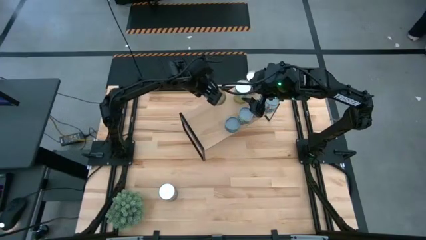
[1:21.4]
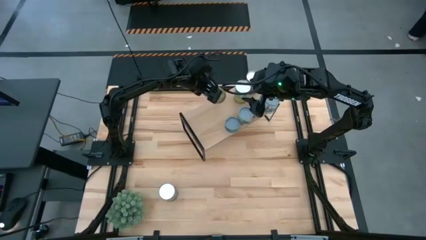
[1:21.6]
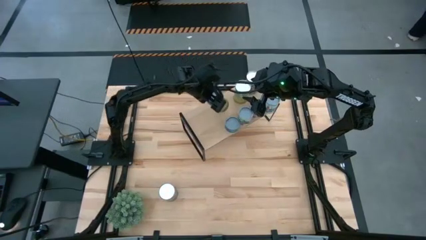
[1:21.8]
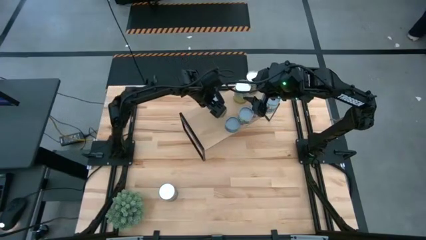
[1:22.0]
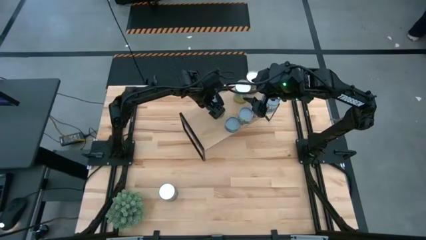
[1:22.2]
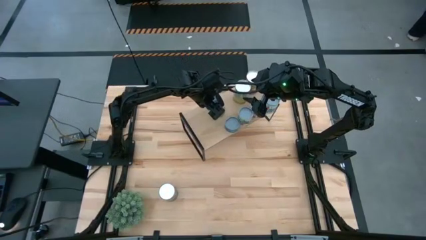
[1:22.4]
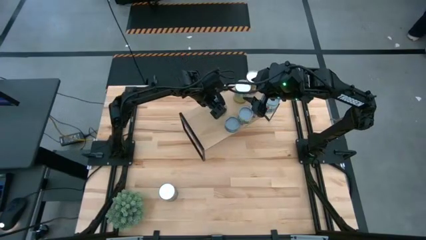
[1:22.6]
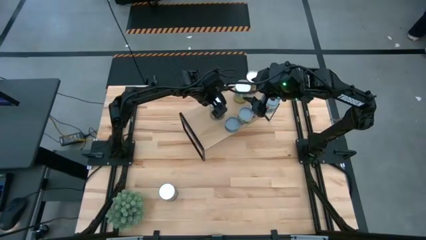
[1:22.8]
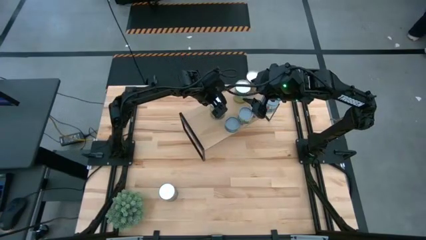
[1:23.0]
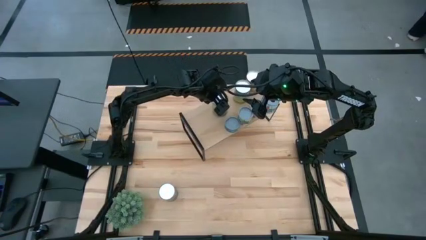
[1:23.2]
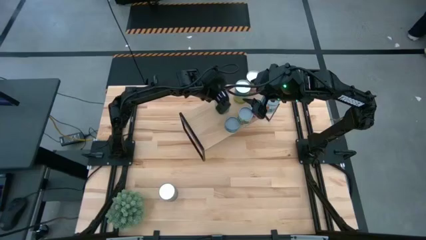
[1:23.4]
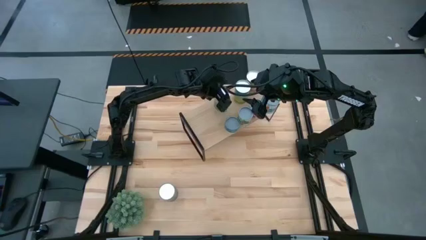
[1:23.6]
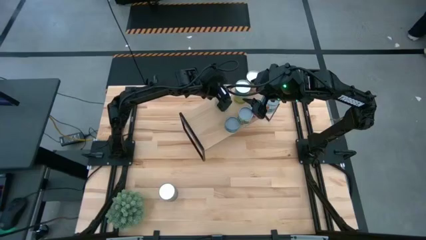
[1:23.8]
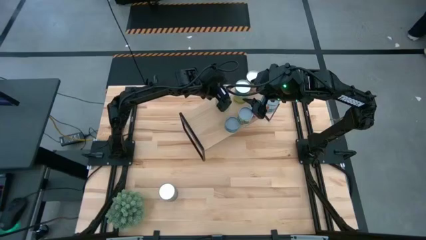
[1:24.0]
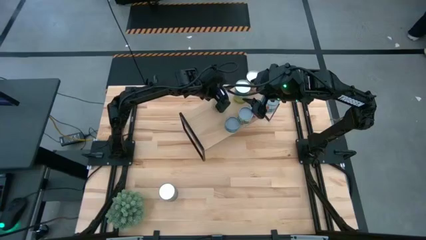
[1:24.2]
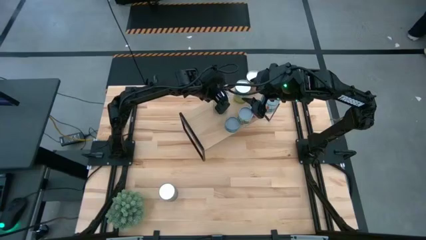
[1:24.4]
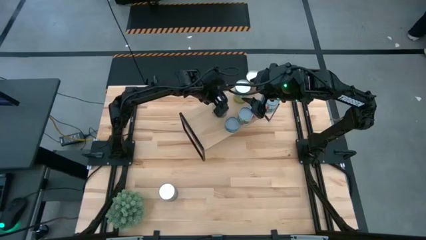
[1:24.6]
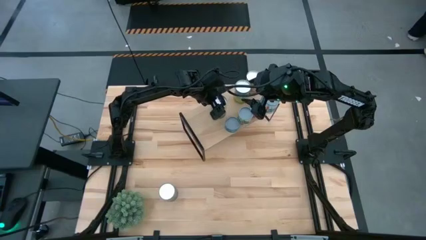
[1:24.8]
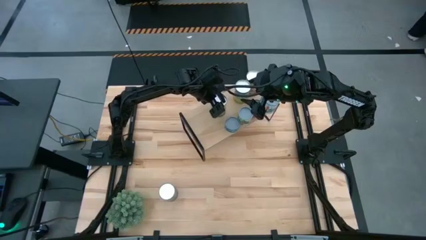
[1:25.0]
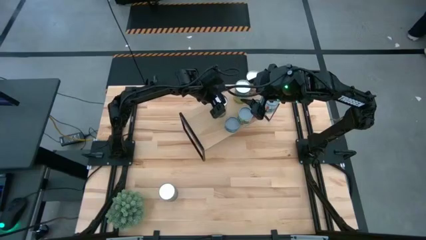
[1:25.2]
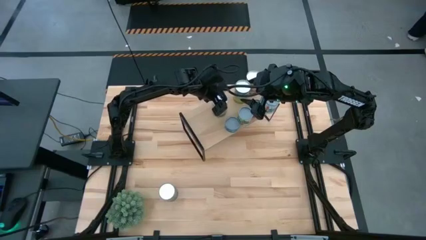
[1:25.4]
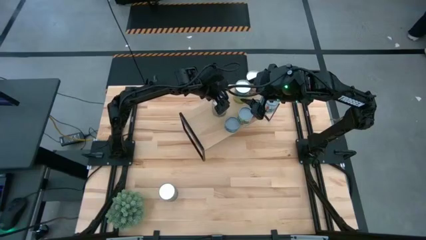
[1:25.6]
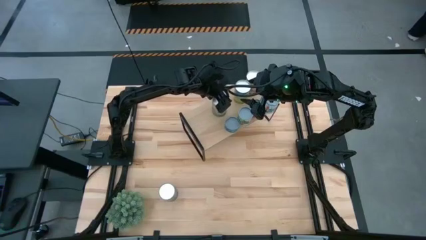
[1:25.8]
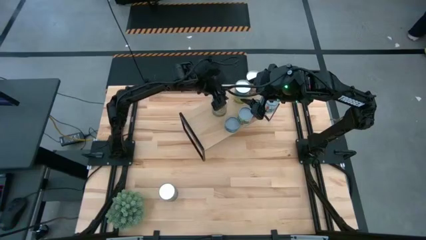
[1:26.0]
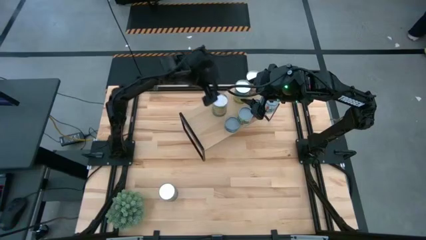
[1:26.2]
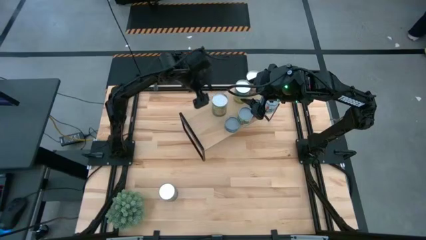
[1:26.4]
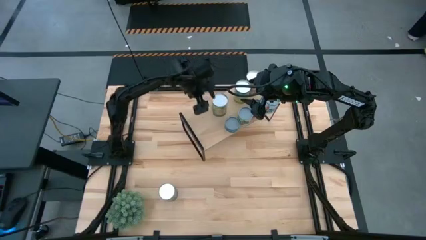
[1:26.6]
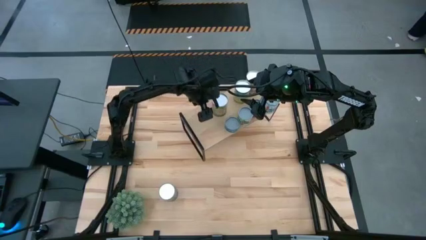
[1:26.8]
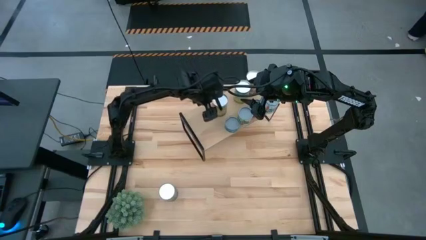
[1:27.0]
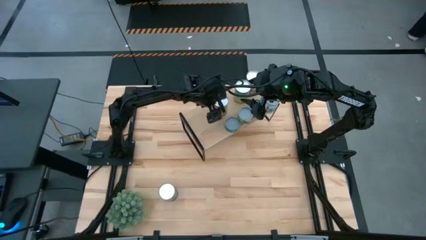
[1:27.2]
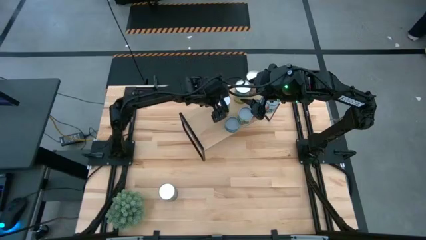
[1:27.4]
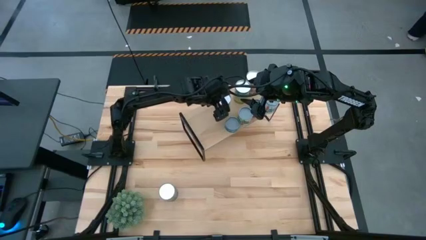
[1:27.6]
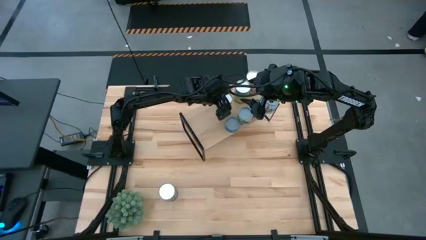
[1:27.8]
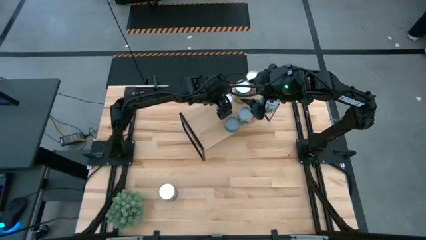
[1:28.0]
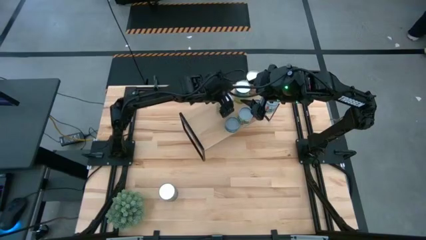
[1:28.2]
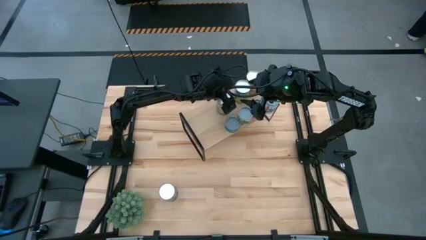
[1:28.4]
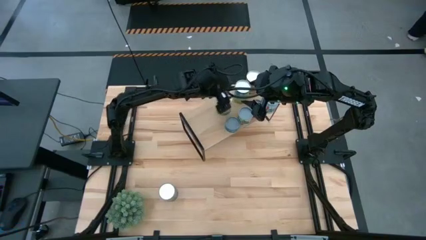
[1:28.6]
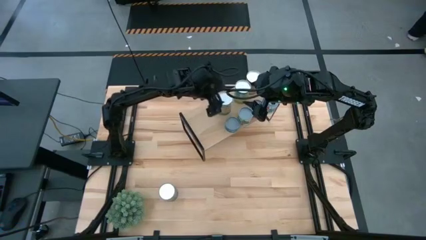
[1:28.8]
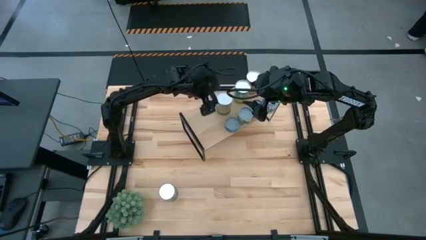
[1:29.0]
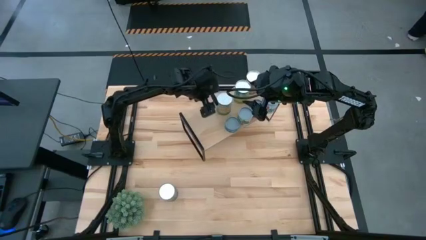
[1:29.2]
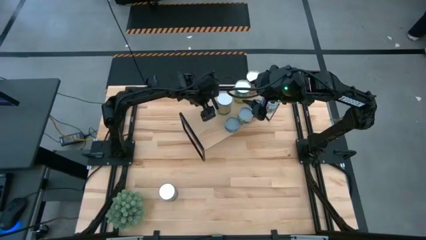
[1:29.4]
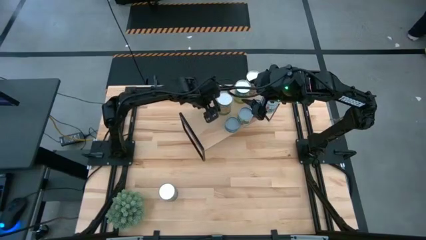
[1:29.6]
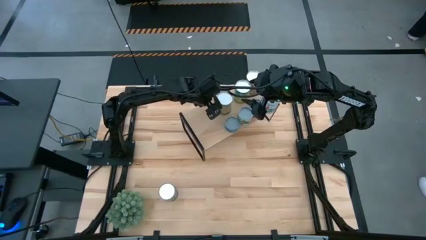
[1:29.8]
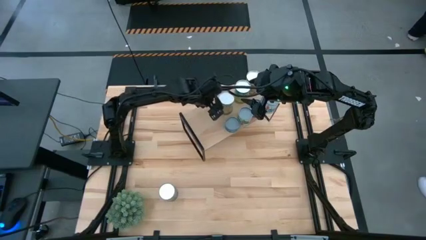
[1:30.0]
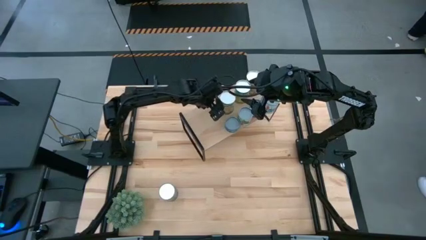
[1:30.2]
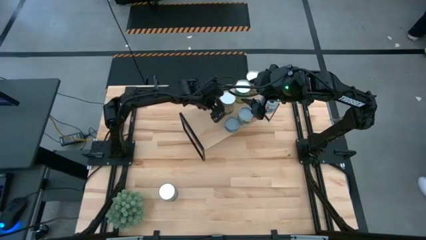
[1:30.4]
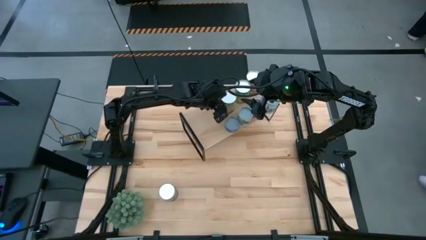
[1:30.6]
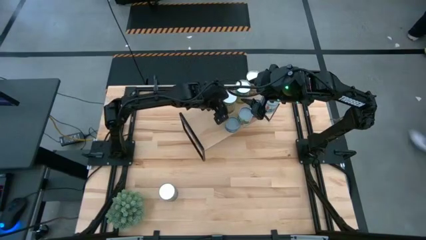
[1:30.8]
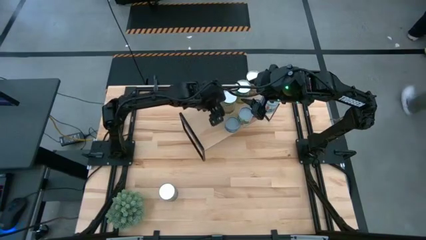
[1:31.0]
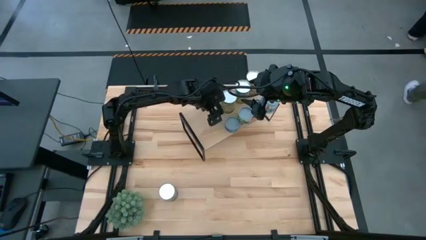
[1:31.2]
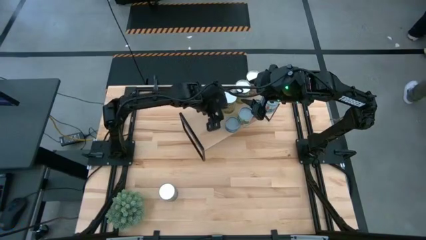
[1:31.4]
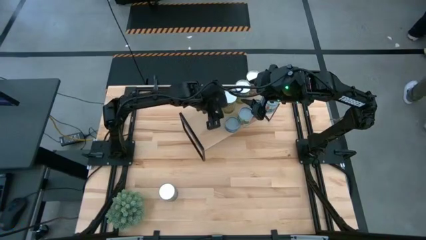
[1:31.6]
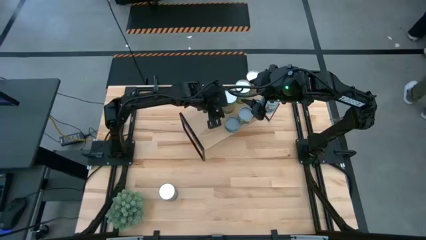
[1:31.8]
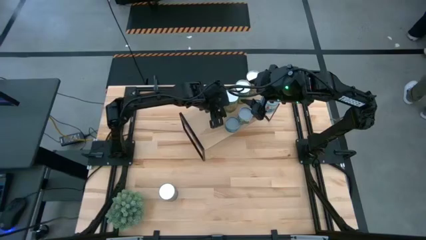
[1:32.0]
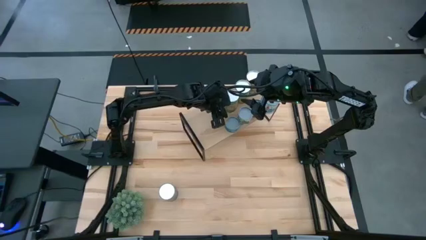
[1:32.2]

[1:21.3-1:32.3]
Task: Pick and place cans onto a shelf
Put the canned oranges on the shelf

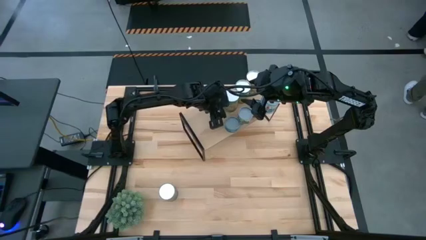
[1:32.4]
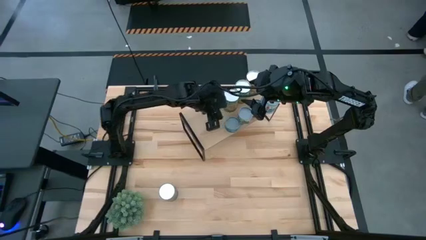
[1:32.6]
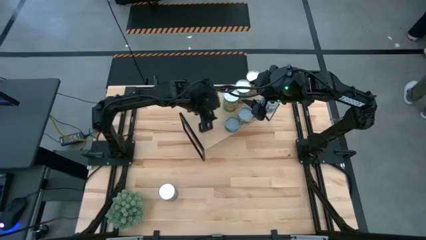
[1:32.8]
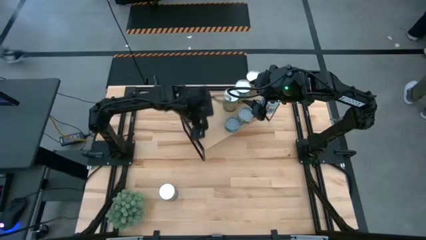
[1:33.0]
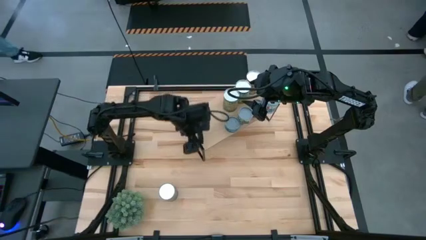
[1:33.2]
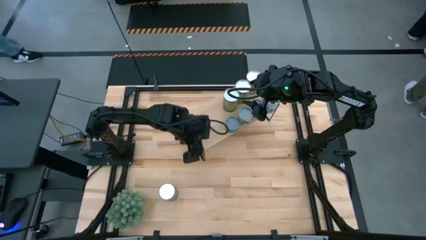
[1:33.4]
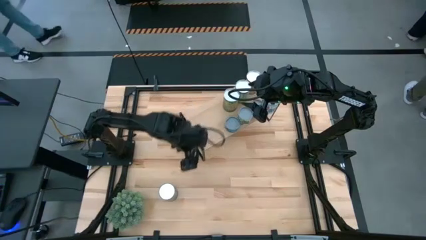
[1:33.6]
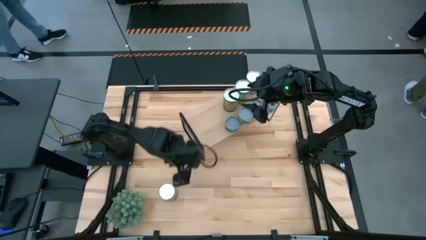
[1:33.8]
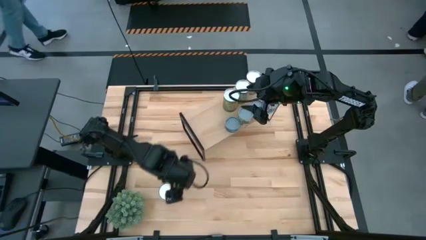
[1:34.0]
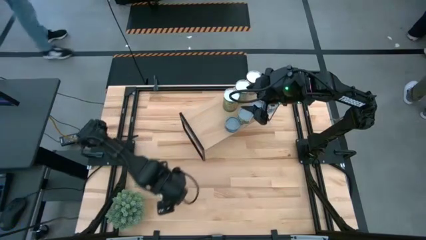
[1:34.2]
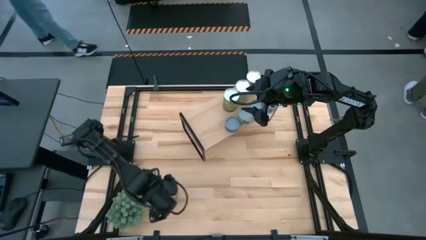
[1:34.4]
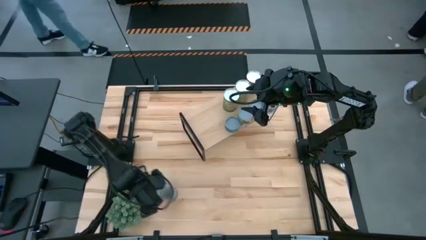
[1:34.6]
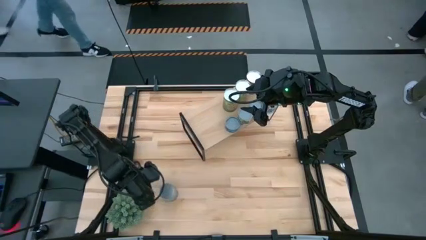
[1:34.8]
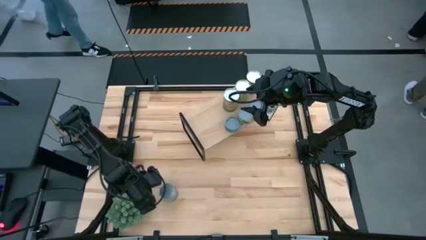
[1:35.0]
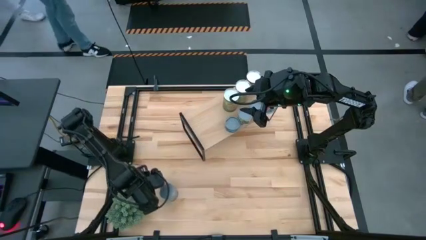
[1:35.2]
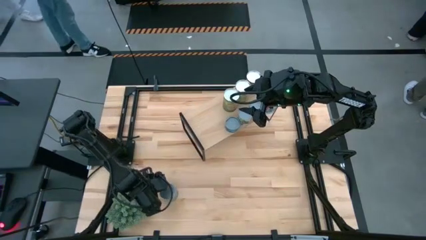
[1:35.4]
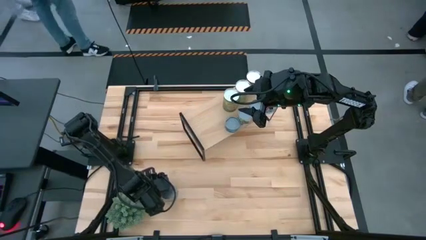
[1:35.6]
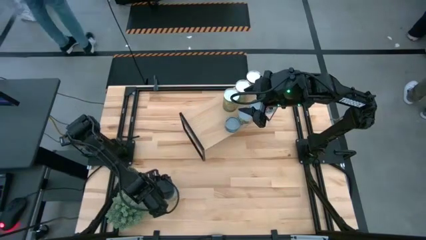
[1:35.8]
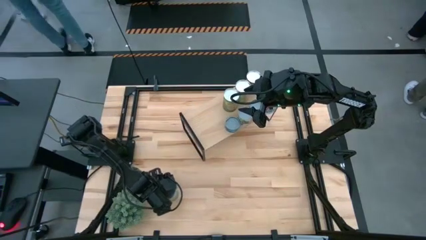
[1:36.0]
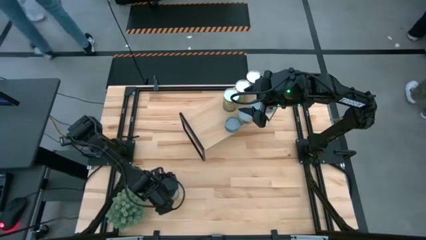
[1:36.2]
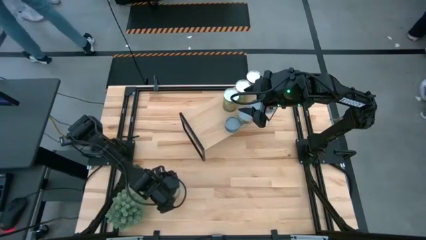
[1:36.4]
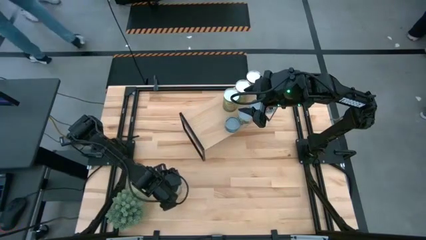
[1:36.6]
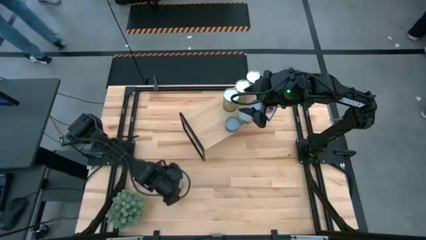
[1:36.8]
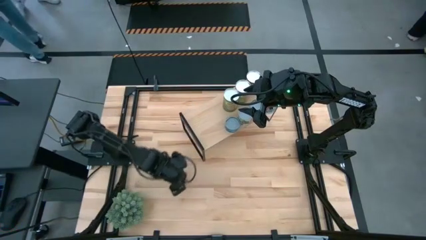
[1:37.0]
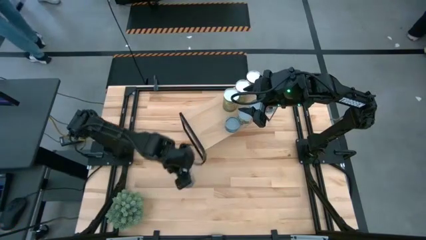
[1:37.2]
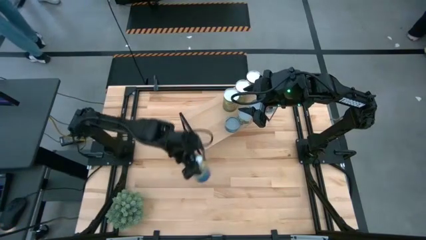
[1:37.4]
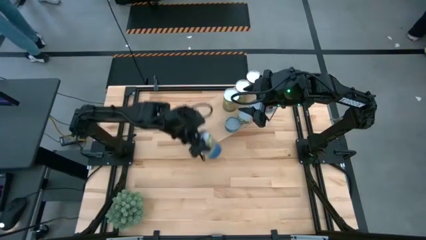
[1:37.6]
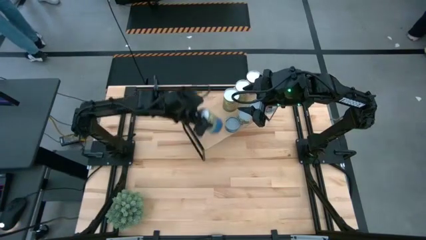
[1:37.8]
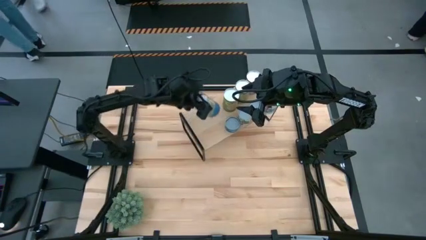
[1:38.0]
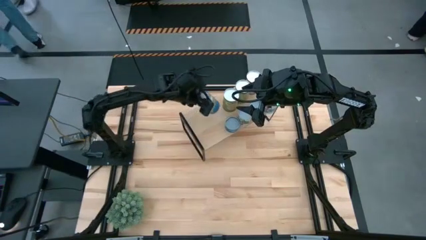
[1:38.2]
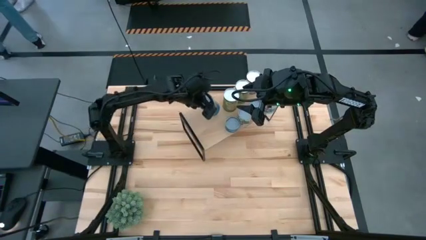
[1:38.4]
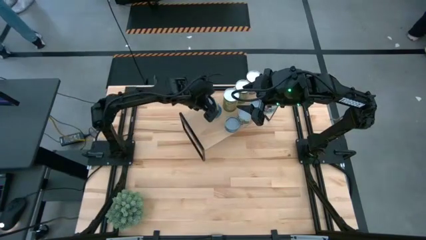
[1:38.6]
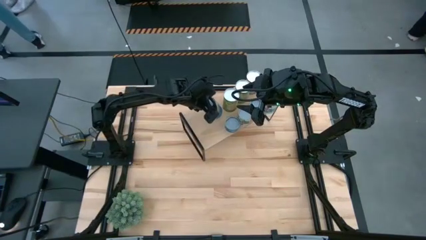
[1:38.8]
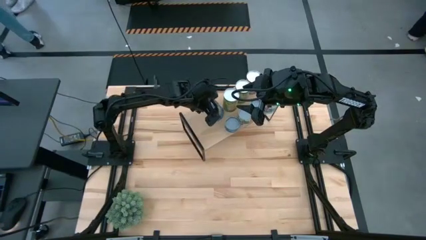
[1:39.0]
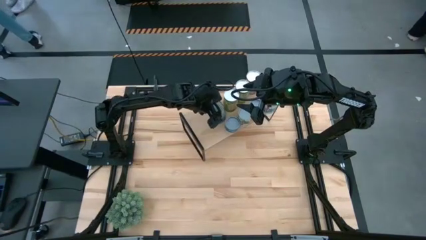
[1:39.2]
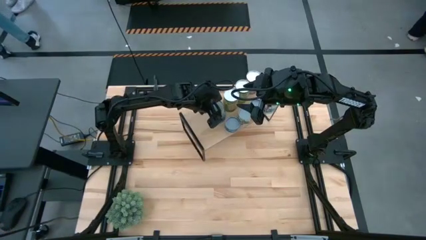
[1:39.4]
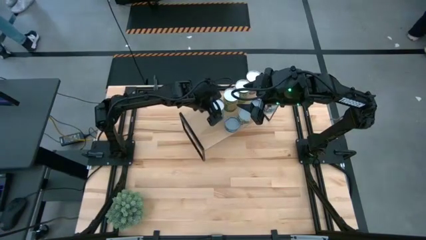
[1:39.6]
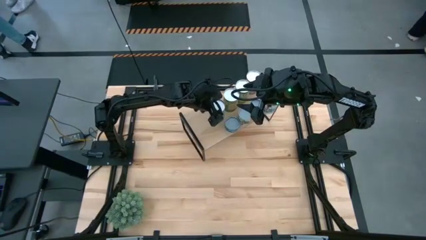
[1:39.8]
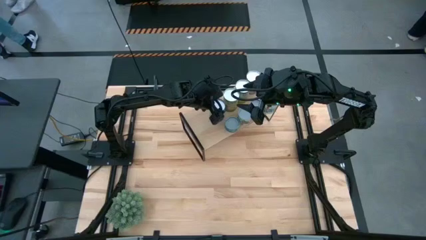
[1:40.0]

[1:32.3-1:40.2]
Put the large canned peas on the shelf
